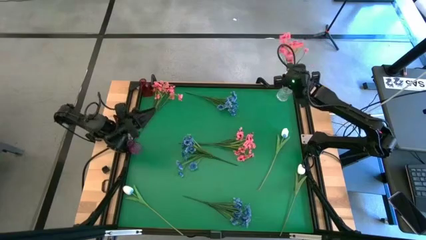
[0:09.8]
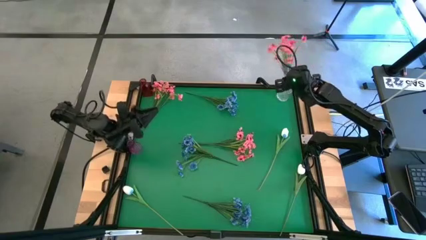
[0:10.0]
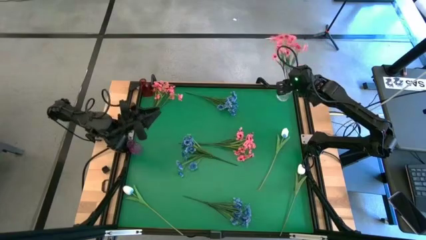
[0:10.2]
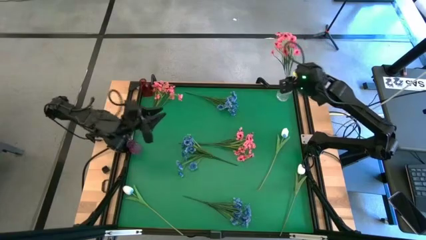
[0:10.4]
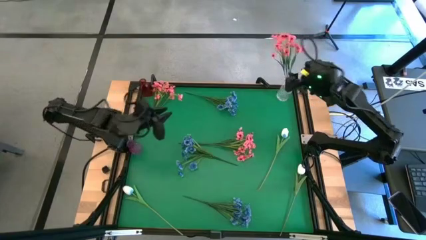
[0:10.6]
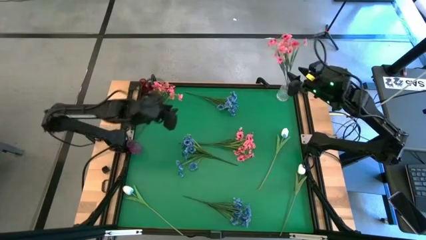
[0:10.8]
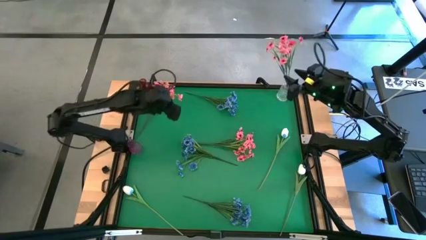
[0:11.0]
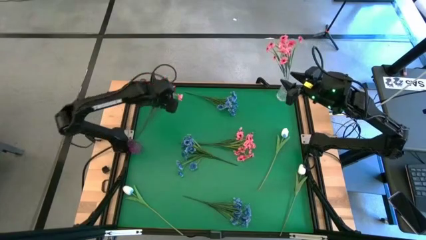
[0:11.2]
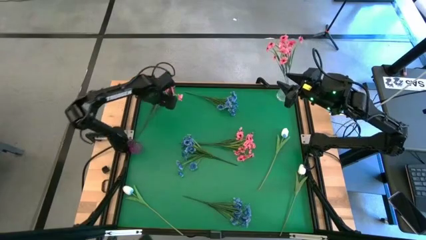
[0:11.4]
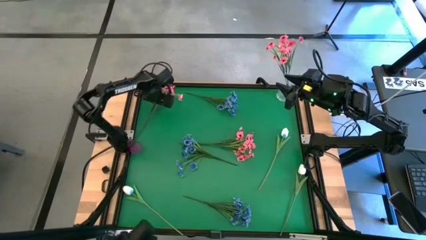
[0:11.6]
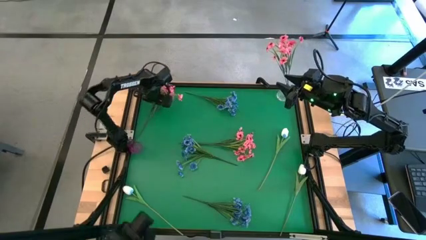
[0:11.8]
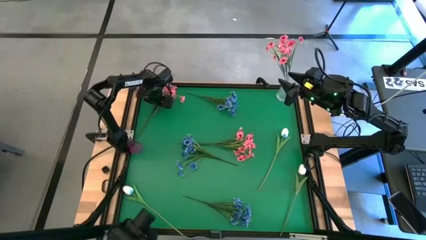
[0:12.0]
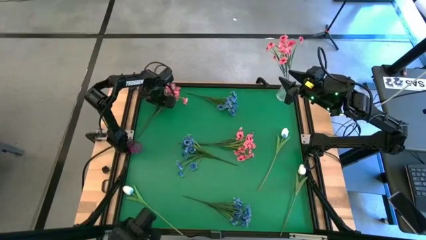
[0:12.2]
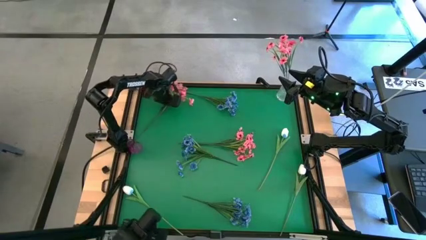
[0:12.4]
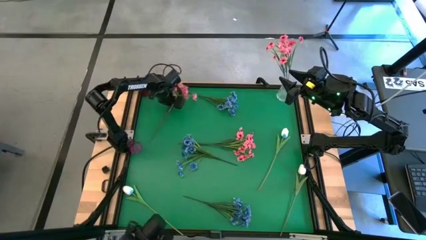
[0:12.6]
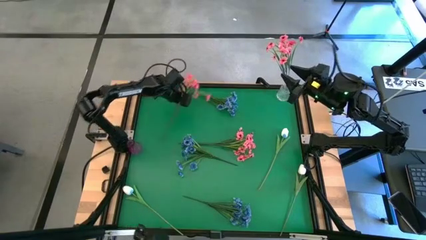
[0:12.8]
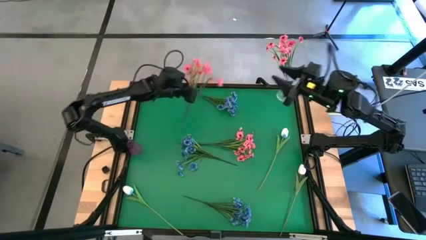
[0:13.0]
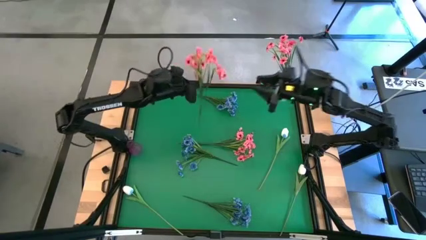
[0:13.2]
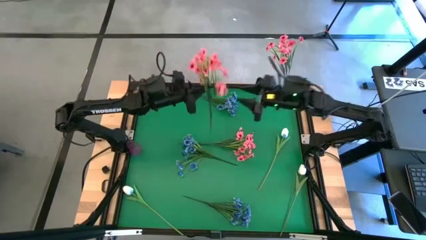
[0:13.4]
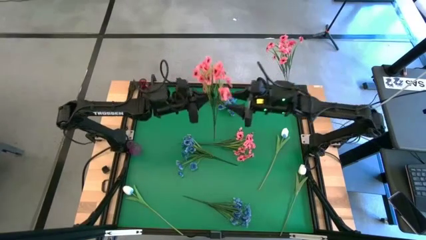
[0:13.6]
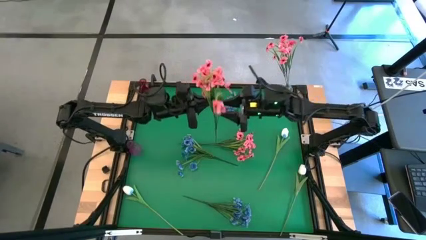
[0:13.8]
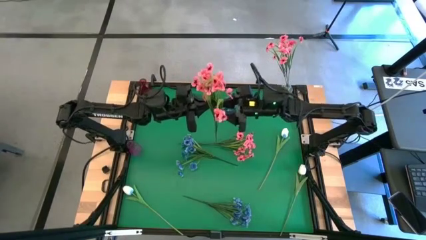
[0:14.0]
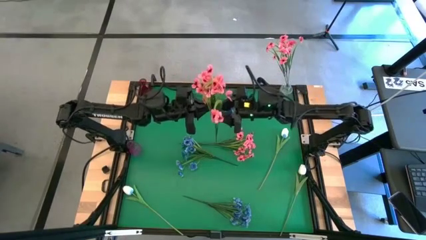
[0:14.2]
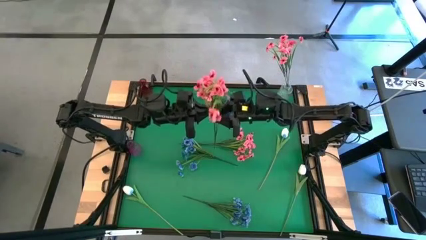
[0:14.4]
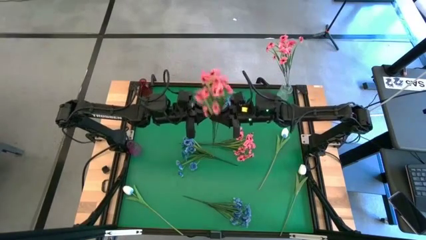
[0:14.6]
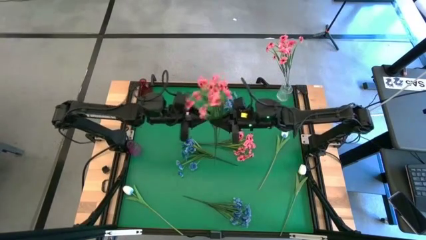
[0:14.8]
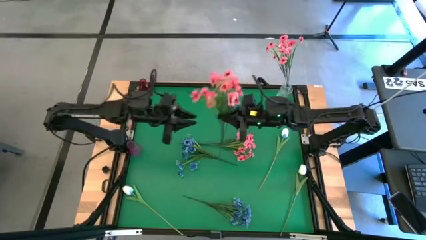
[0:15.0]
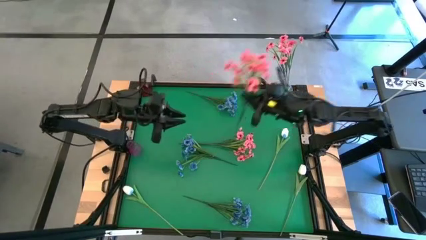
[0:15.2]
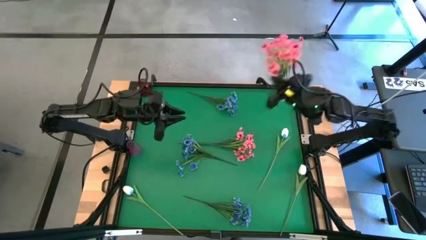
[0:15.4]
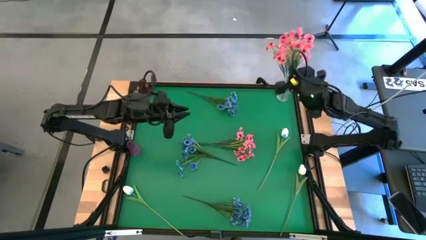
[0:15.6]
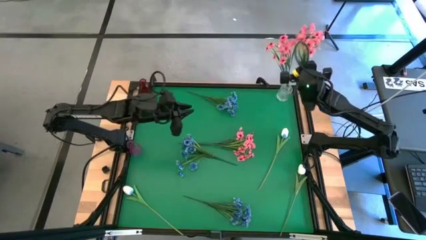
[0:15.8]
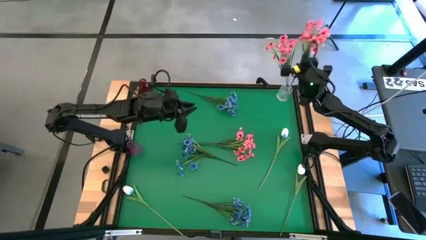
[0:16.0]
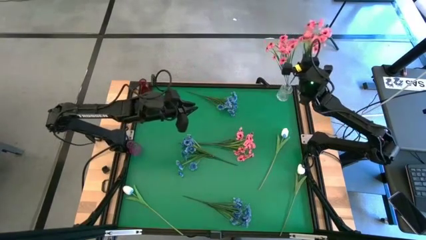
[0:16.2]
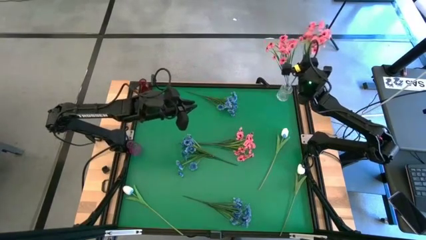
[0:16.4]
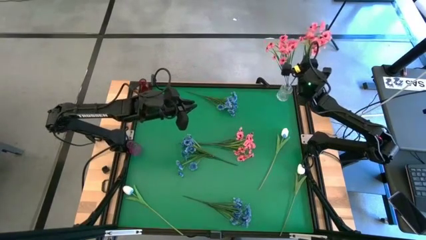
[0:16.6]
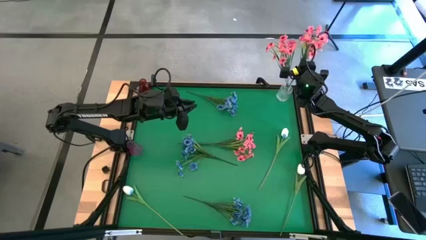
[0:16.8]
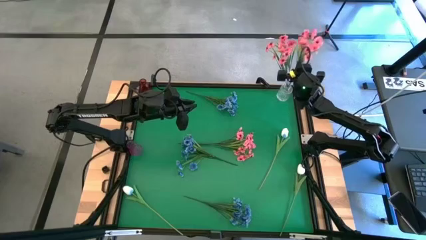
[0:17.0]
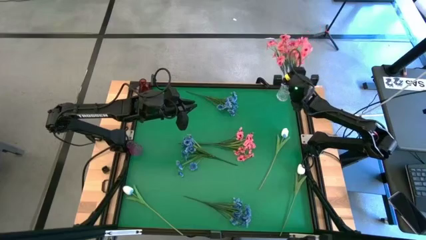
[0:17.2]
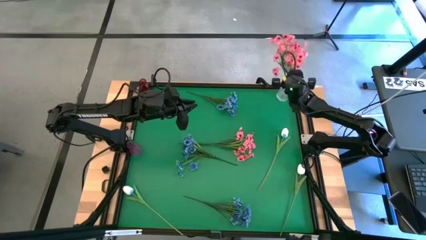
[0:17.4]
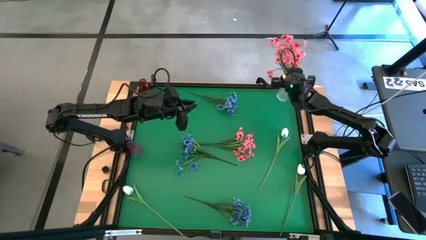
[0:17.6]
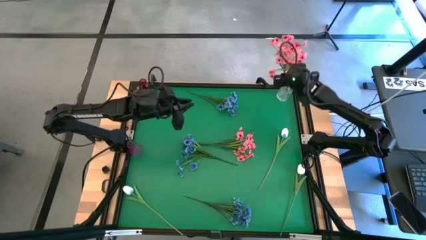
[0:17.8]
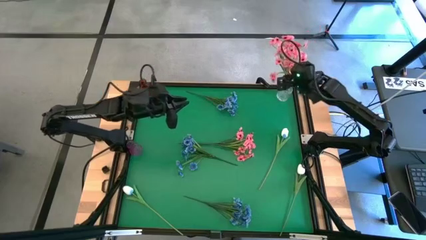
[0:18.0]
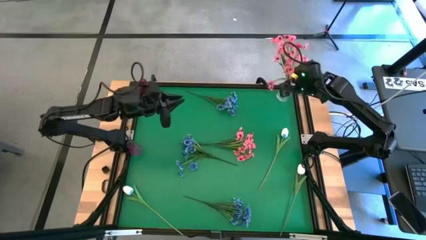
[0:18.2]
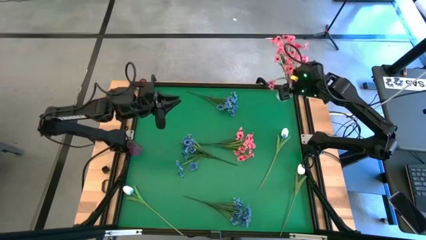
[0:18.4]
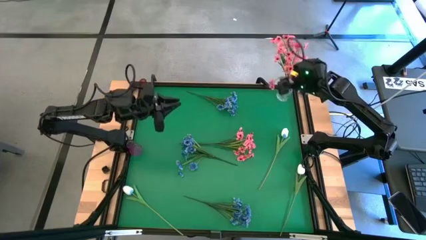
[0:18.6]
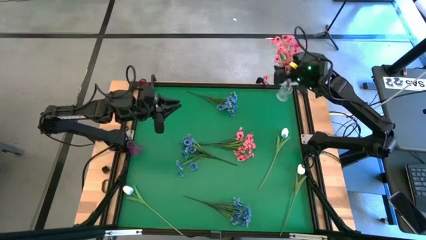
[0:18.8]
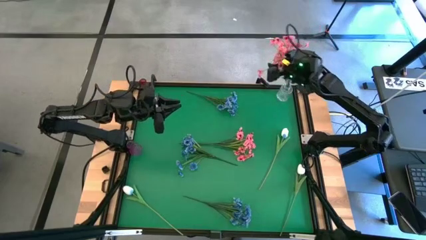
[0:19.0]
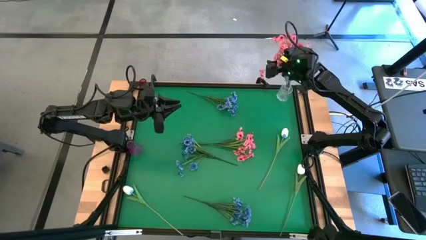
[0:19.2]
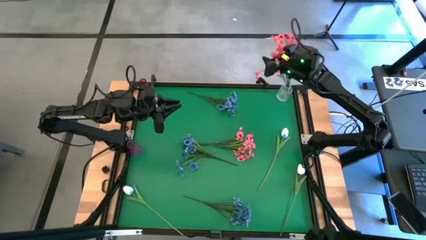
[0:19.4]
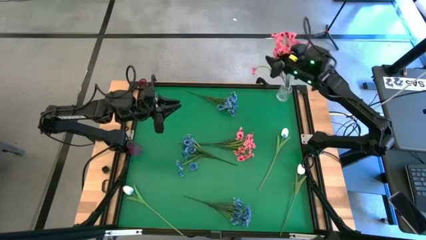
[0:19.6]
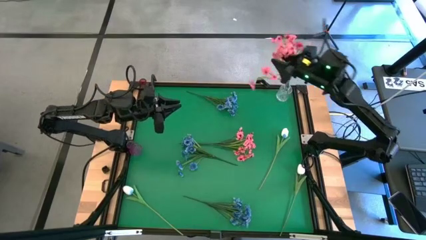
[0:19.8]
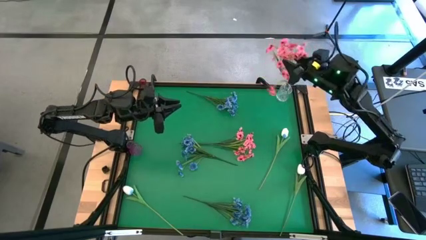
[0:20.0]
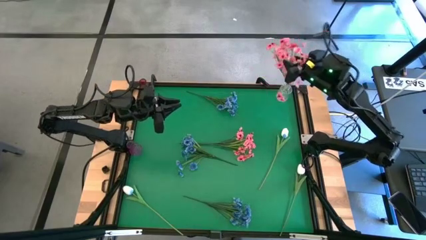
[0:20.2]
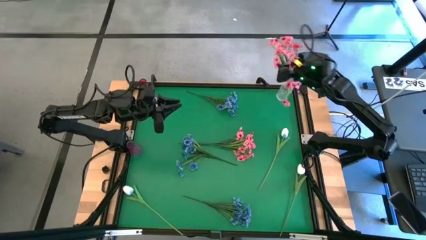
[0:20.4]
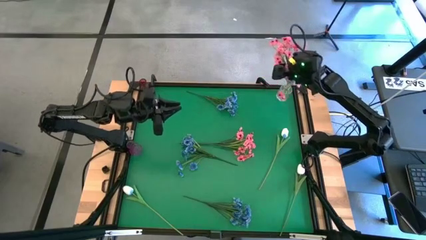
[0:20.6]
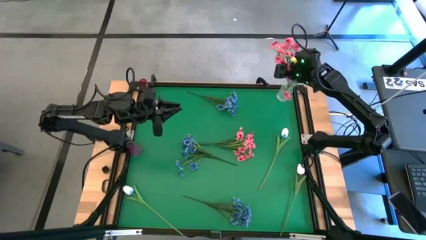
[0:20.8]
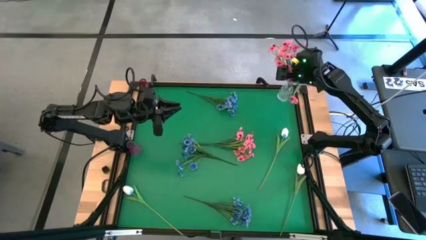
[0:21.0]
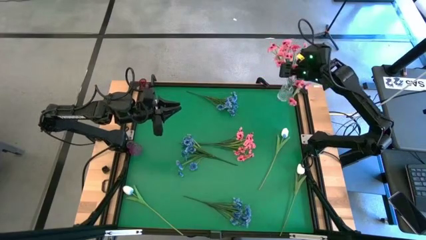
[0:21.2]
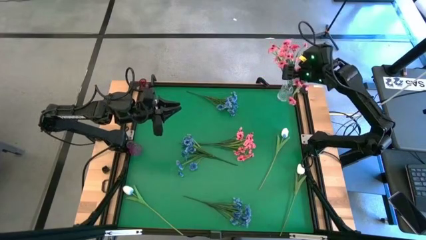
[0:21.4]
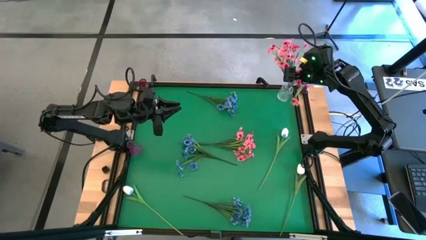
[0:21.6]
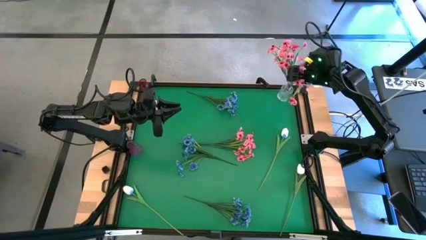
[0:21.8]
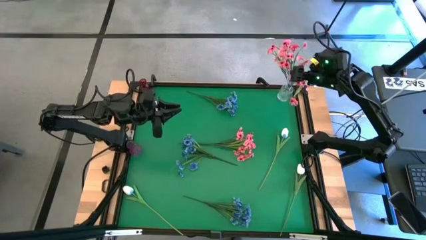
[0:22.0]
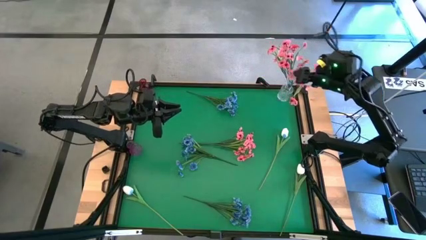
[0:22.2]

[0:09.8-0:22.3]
Task: Sort flowers into vase by color
Put the top pink flowers into the transparent vase
